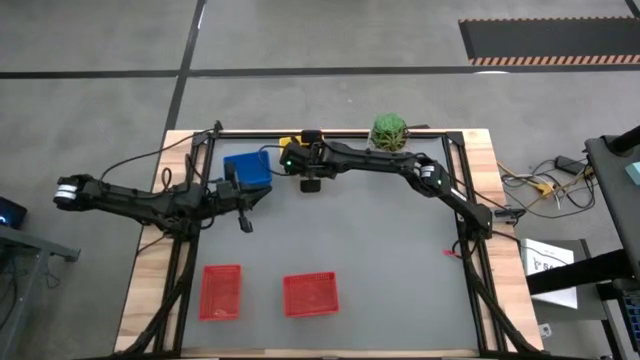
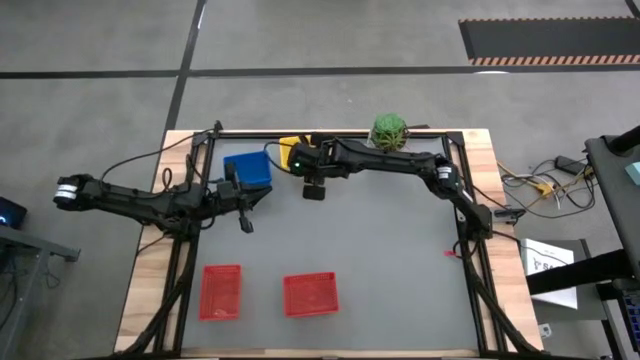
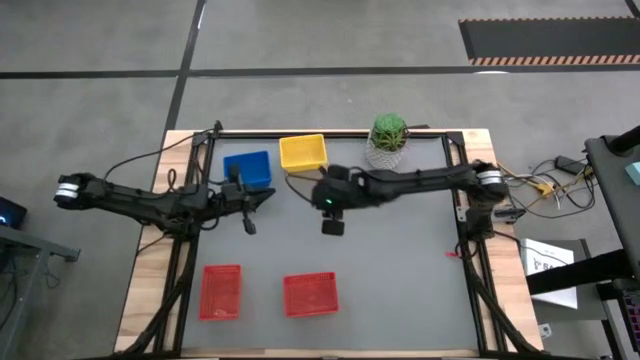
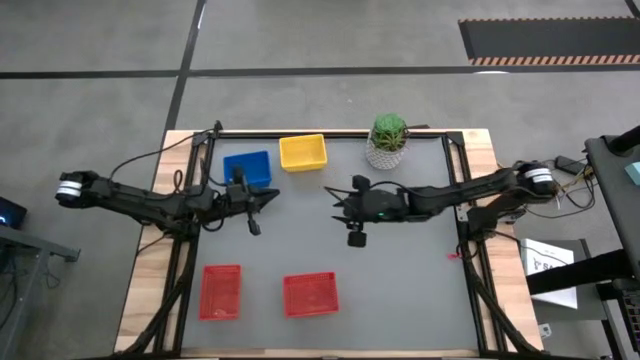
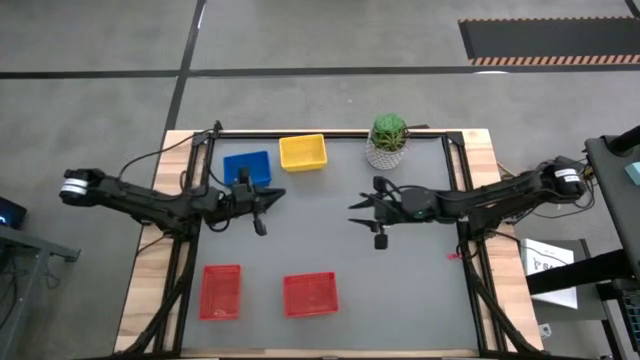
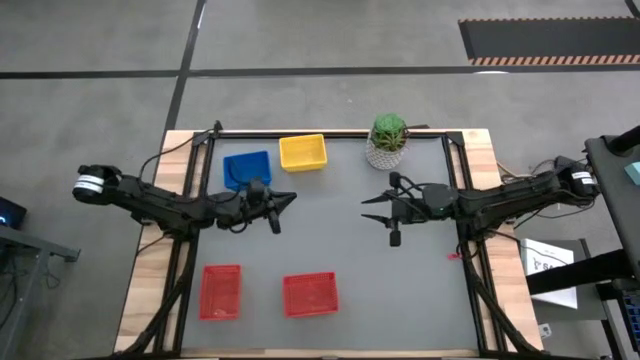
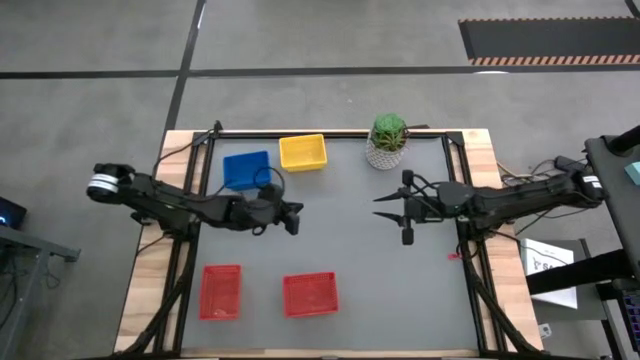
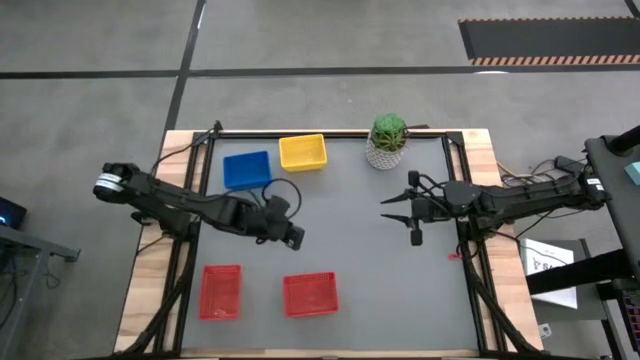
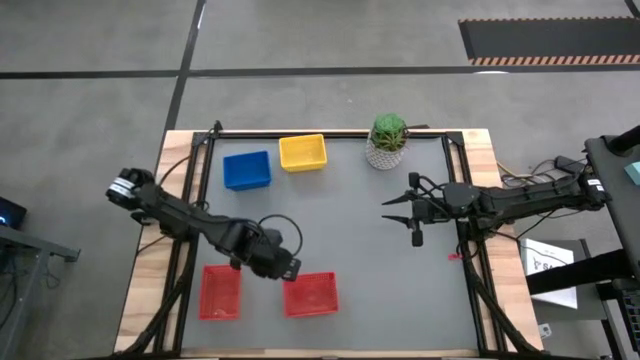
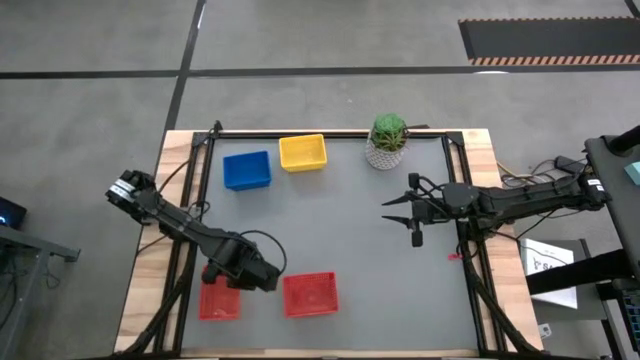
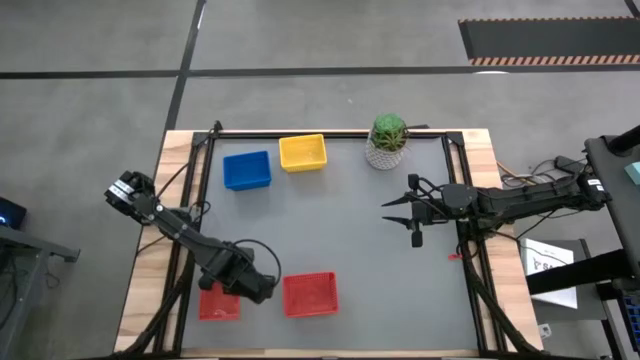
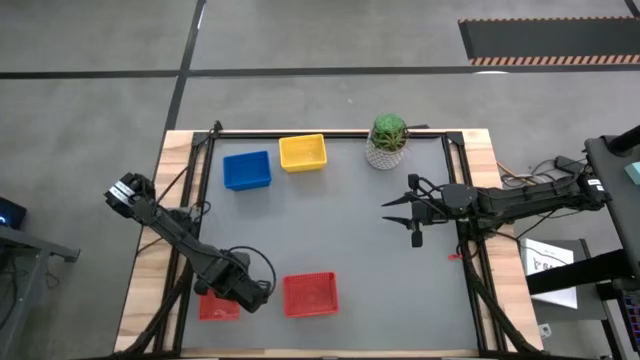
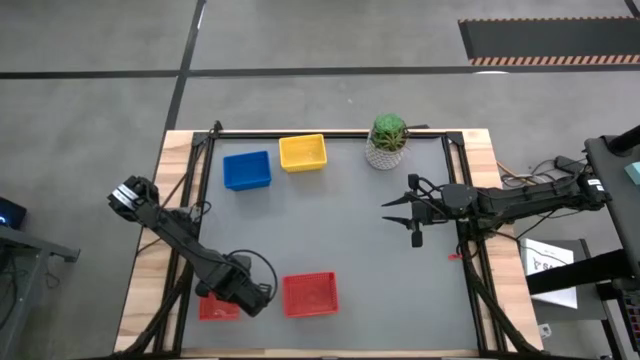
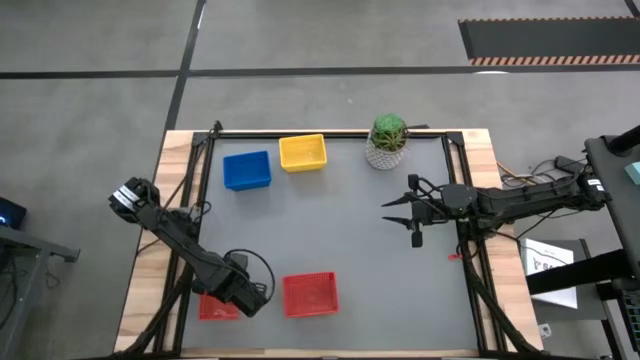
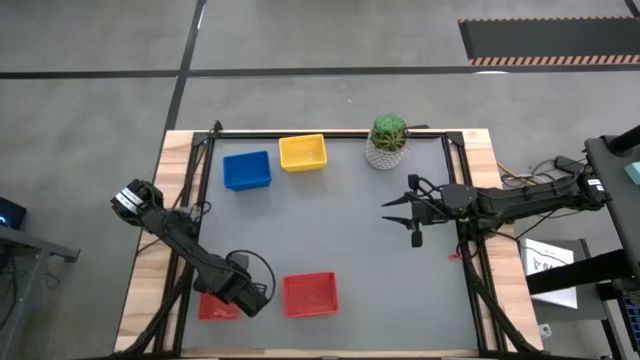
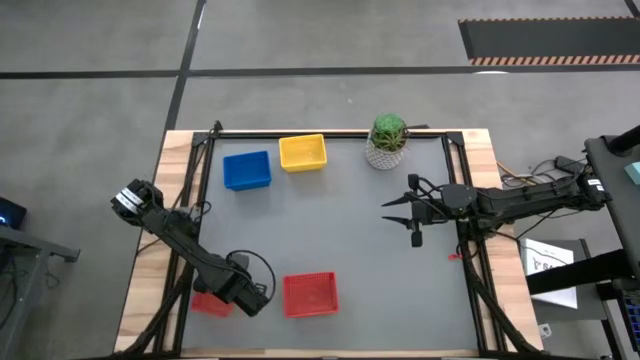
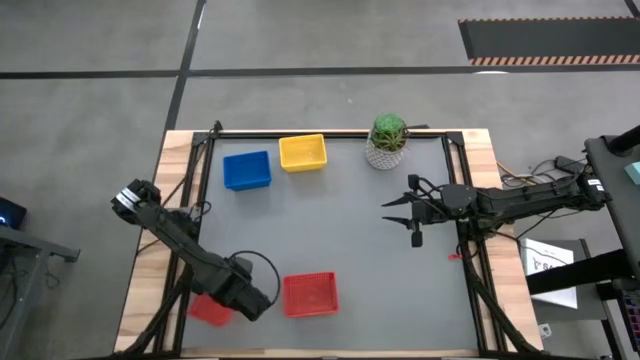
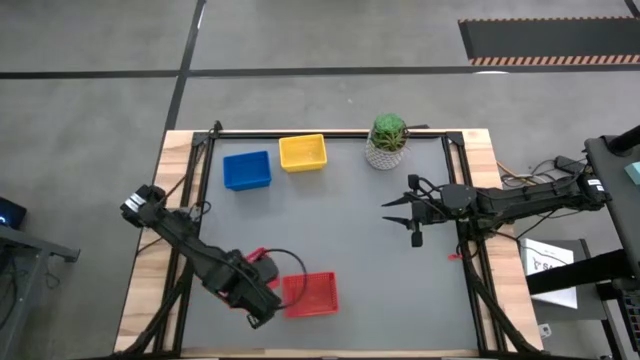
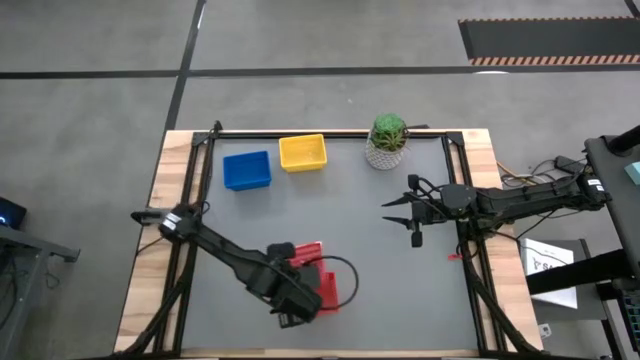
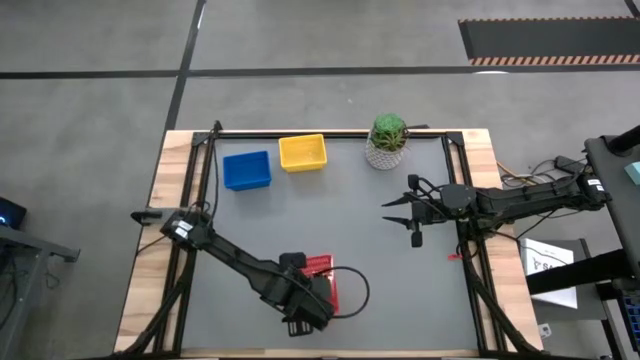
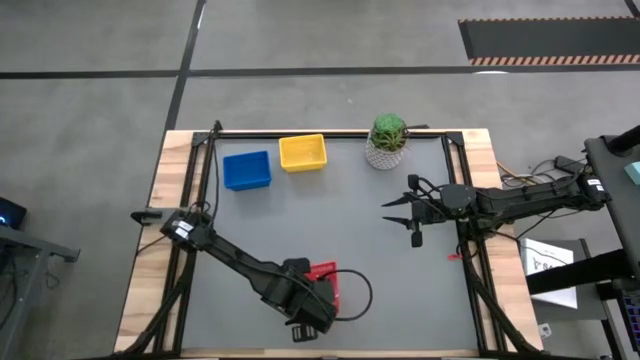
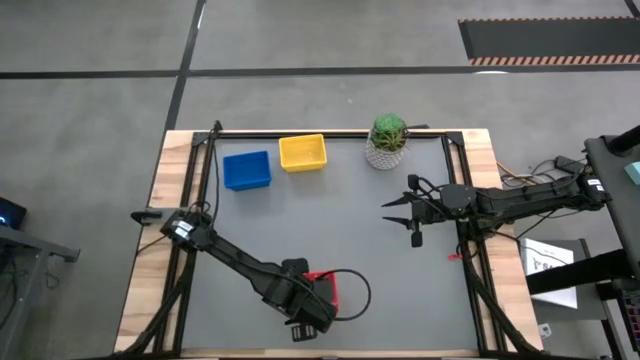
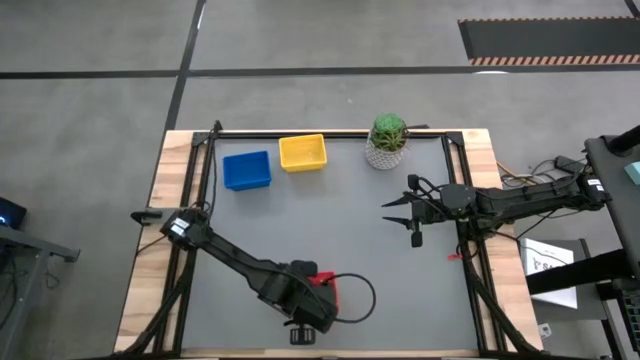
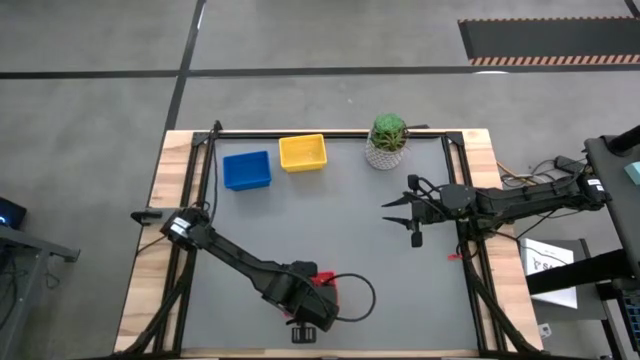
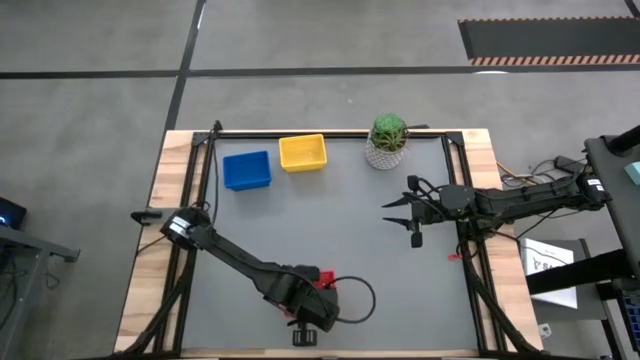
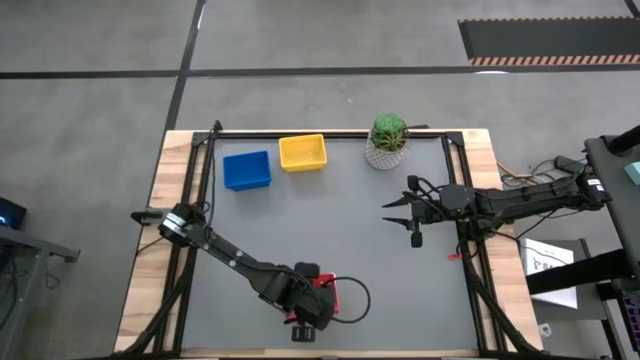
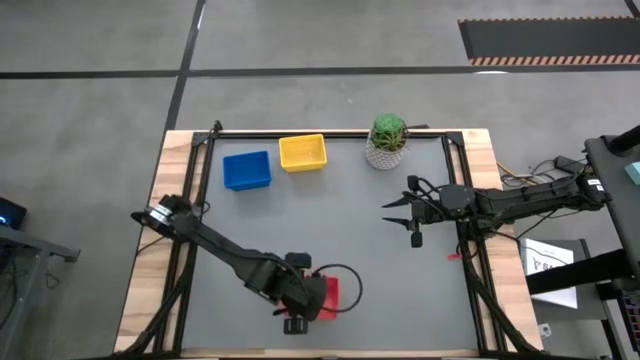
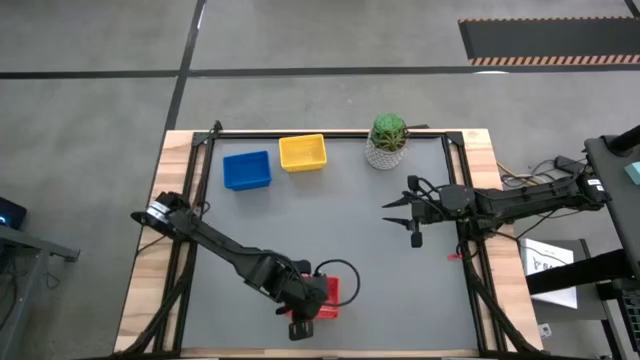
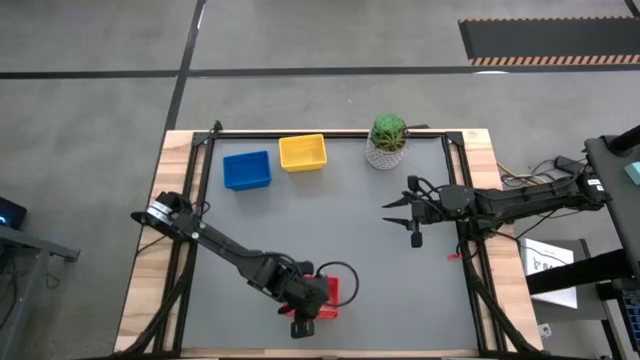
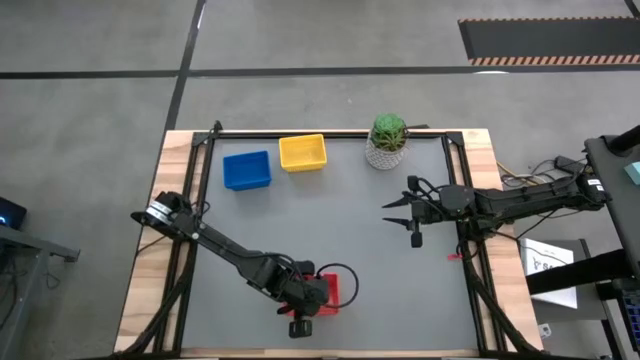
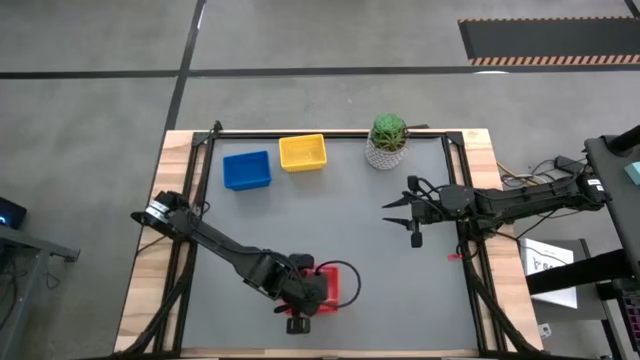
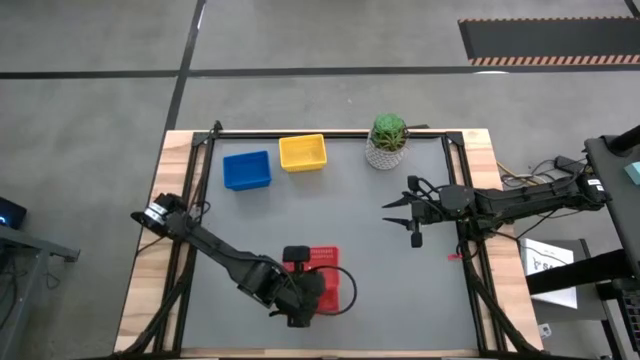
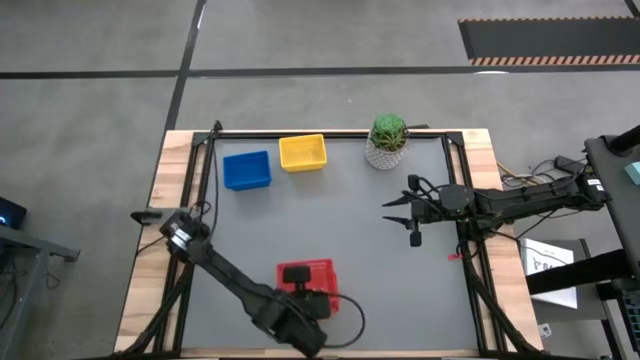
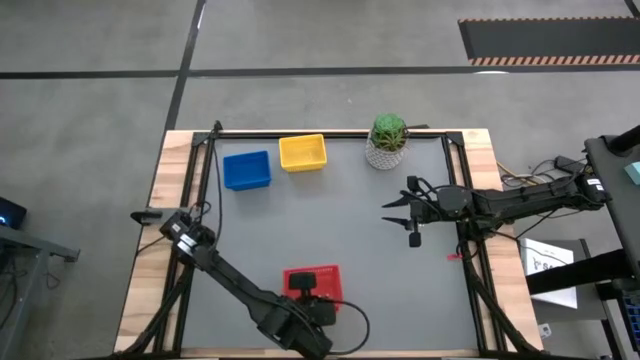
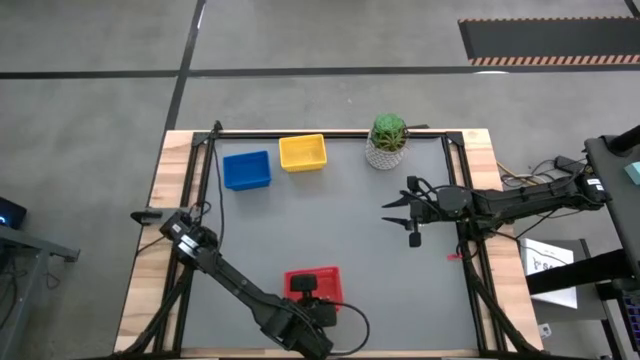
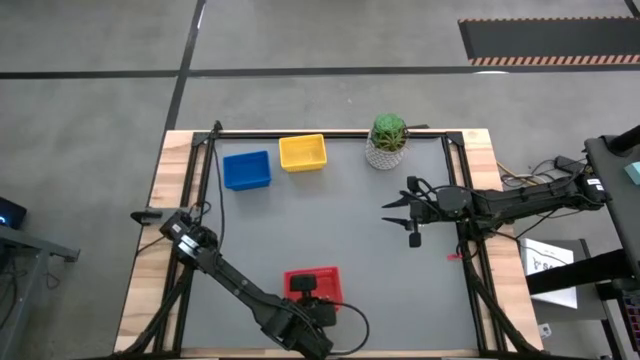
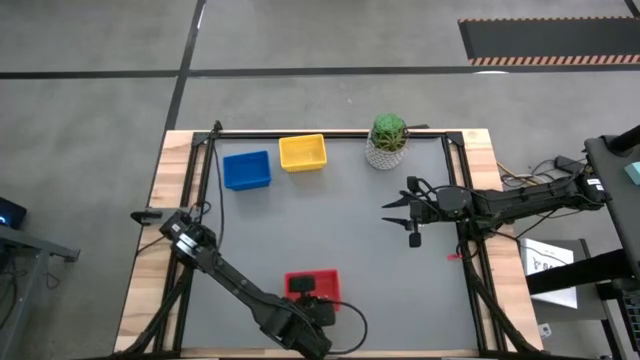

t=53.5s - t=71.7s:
Stack the red basket on top of the red basket
